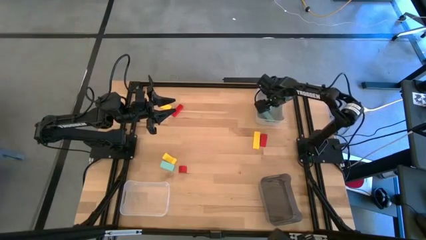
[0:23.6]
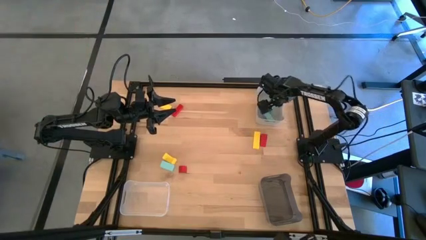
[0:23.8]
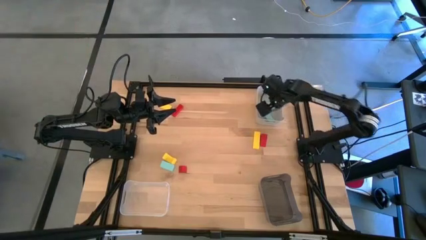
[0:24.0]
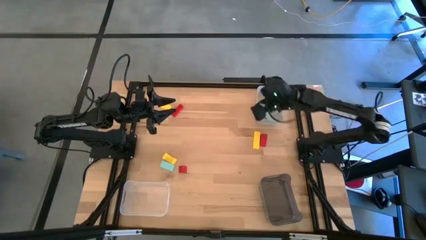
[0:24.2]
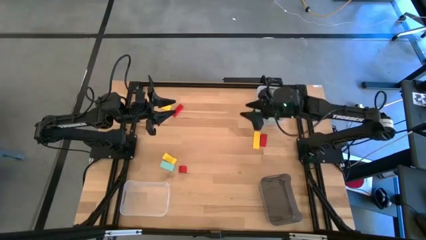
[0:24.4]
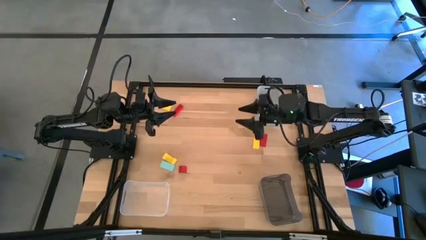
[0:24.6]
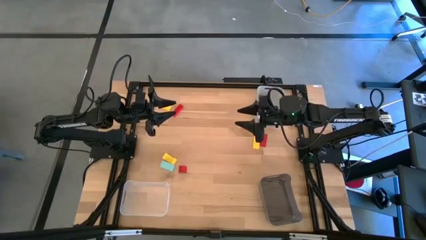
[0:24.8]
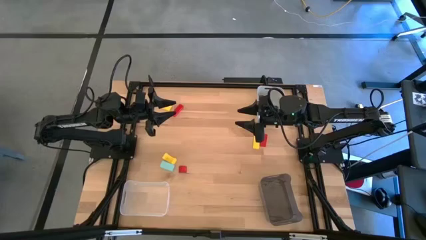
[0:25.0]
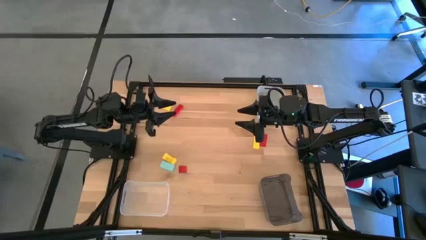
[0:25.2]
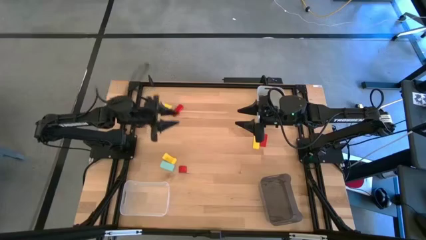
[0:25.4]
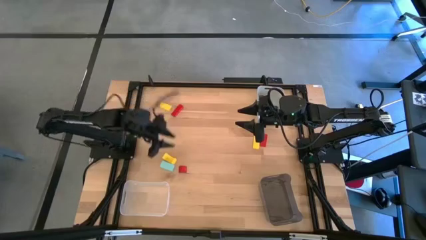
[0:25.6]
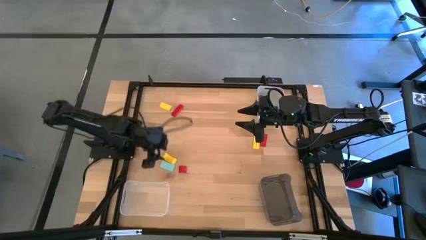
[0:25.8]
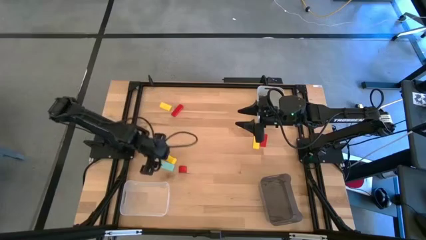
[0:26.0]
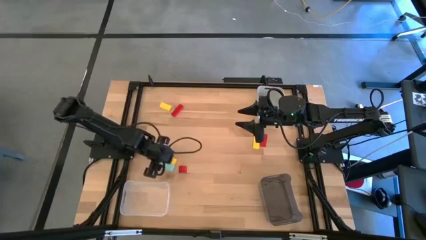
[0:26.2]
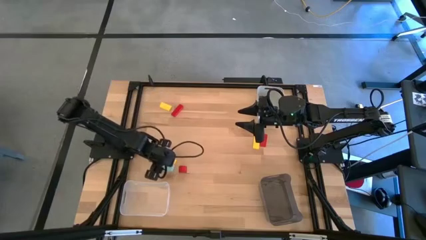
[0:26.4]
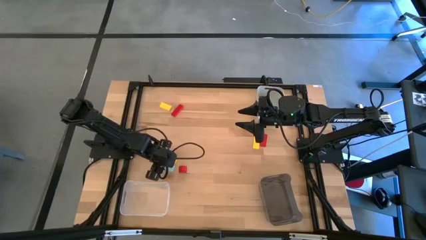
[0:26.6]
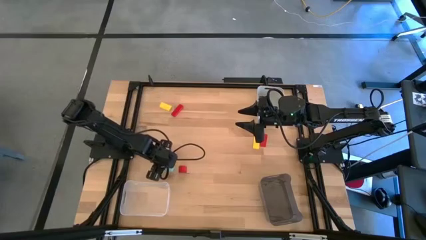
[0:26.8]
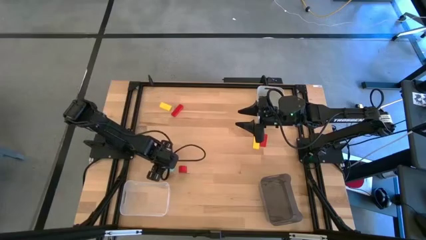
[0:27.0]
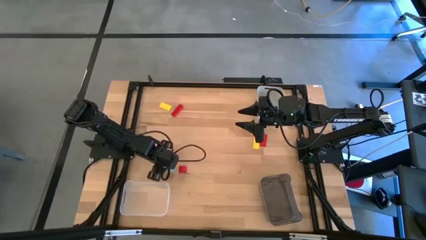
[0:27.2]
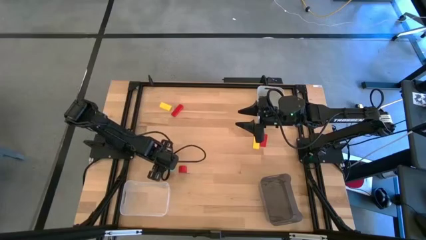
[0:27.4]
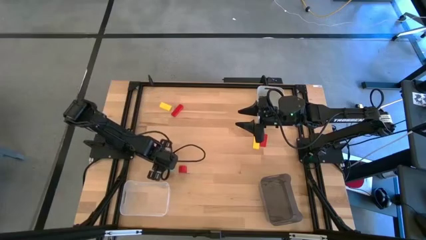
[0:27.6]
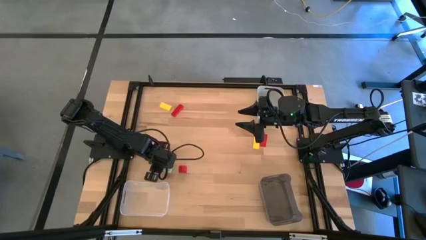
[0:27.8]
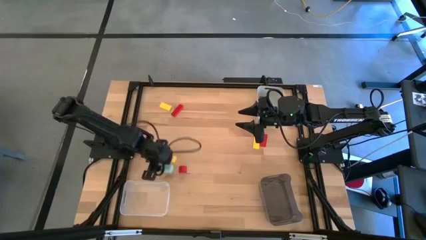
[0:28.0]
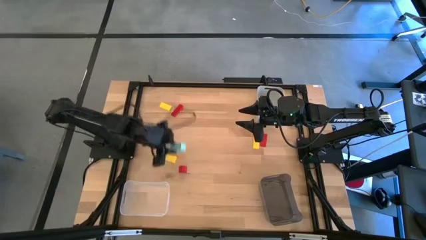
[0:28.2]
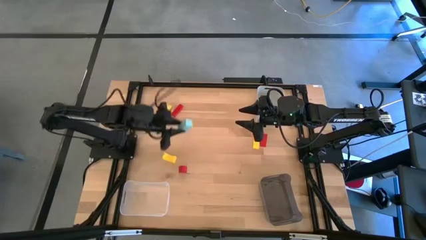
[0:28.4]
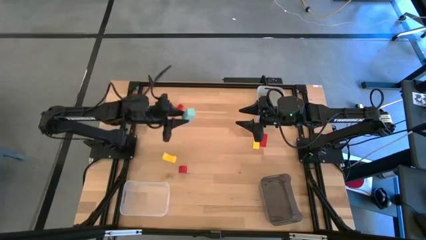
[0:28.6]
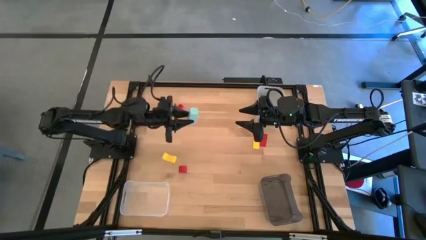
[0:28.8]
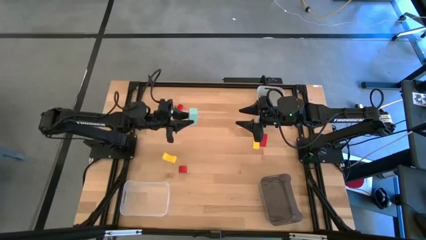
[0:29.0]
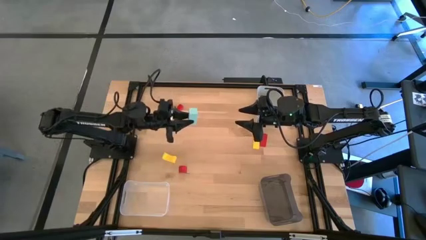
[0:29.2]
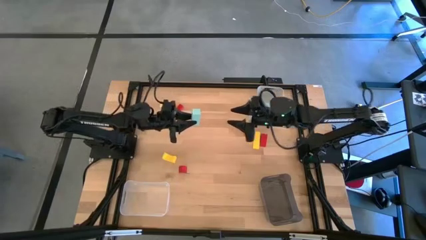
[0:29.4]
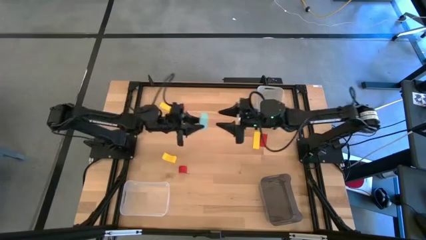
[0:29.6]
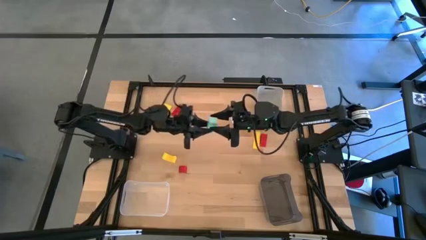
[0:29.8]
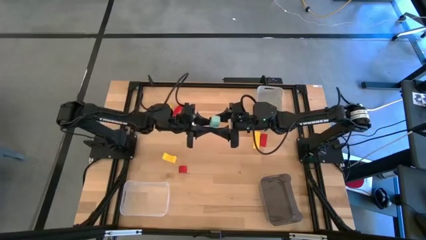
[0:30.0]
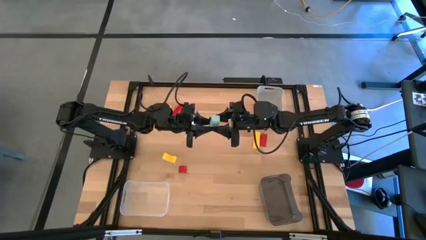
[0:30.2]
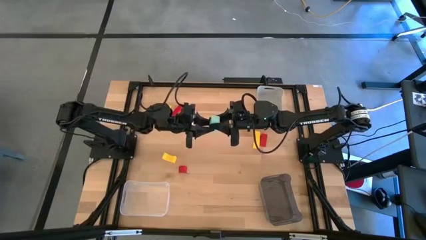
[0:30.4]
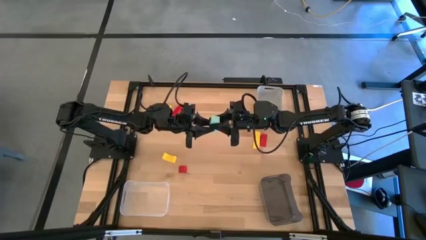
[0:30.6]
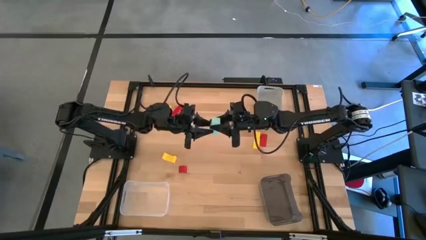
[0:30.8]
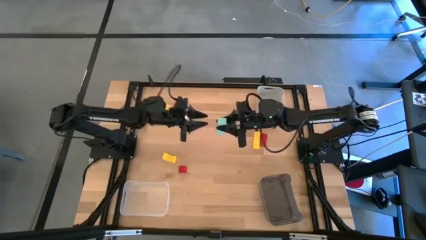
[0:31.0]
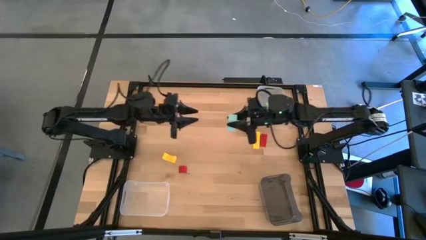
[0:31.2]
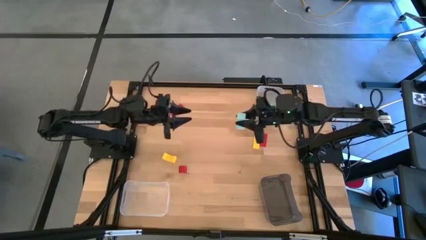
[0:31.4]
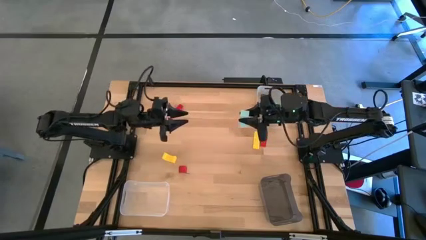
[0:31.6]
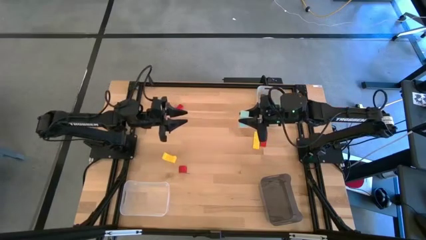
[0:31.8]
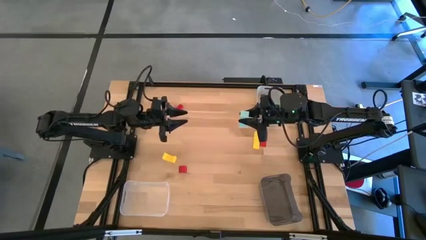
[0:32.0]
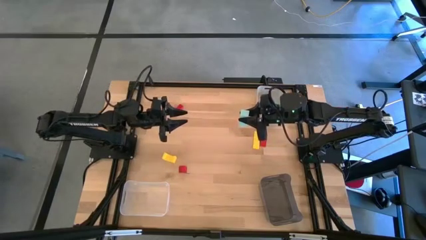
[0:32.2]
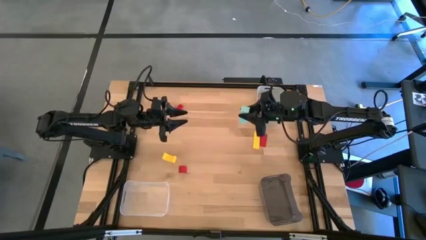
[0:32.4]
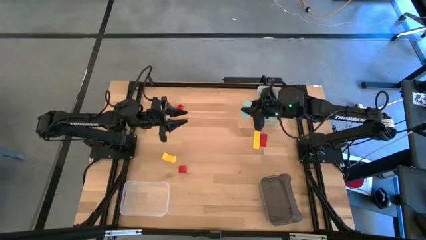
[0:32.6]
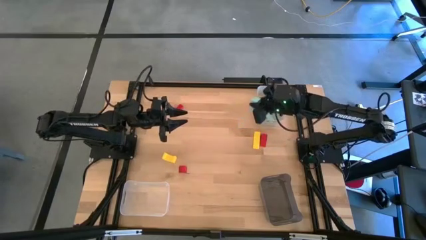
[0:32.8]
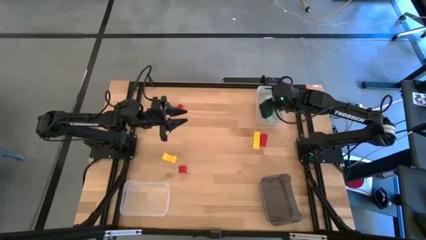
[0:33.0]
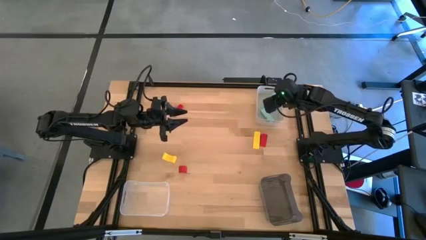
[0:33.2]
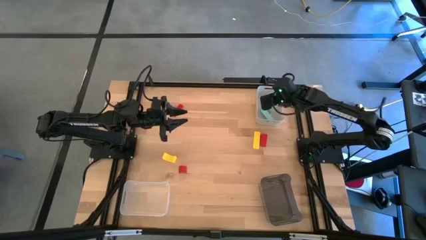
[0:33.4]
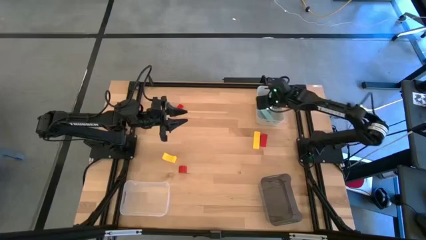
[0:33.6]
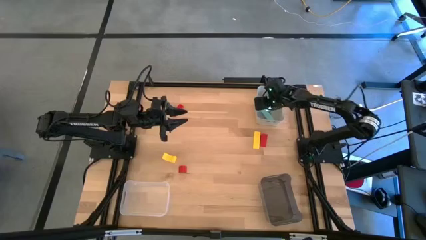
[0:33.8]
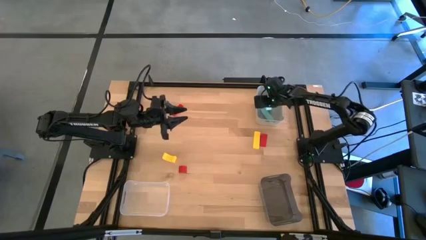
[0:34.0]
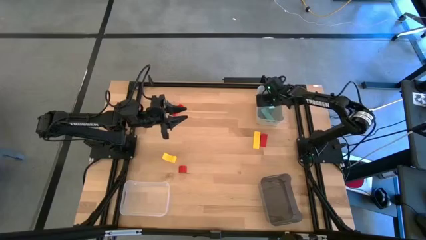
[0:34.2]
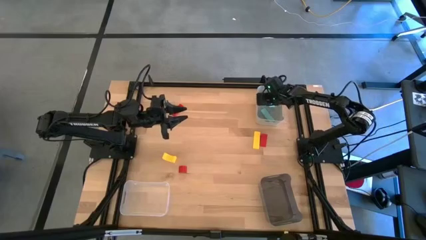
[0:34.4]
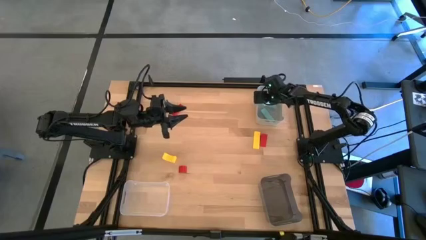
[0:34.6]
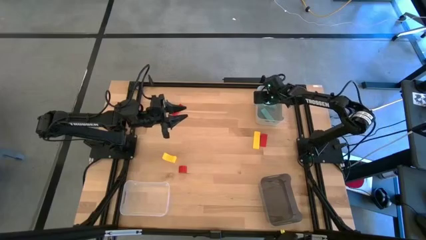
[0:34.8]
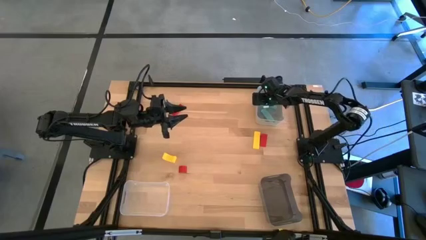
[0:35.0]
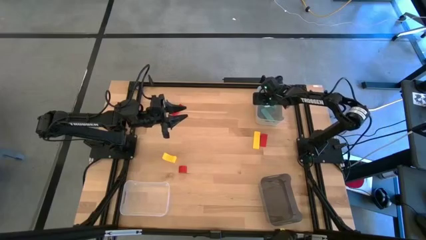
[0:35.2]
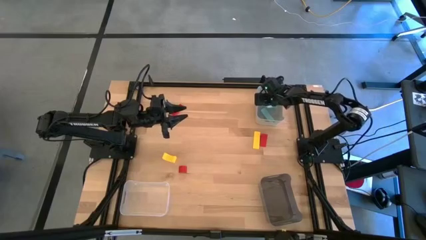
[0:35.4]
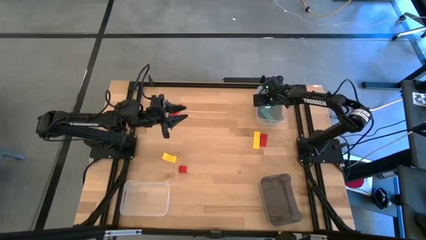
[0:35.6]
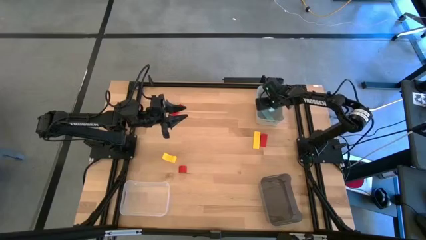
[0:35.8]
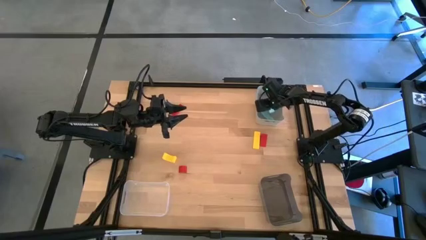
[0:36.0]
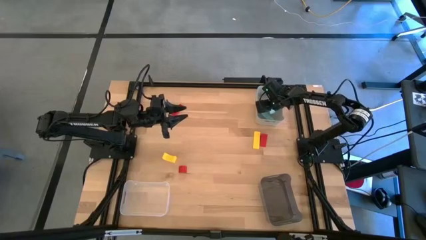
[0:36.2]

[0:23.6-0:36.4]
Task: Sort & place blocks by color
Put the blue block into the gray bin

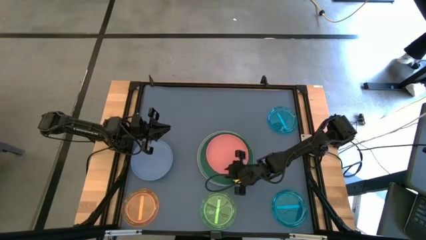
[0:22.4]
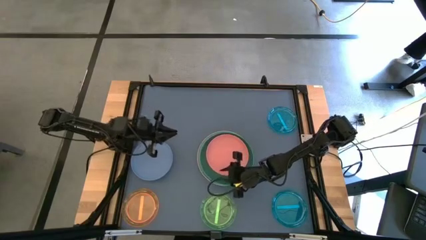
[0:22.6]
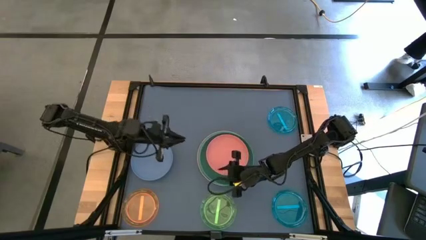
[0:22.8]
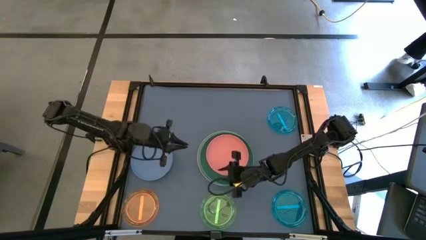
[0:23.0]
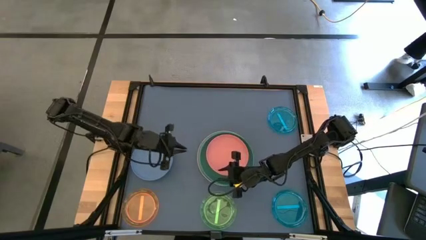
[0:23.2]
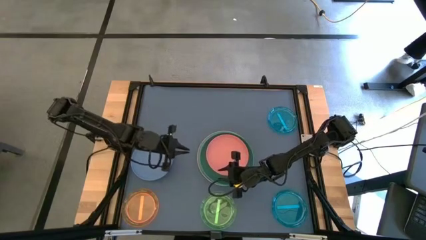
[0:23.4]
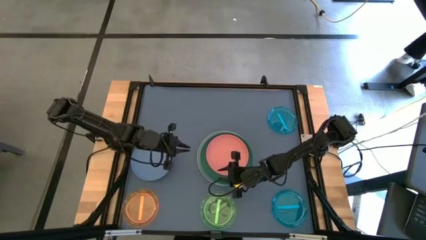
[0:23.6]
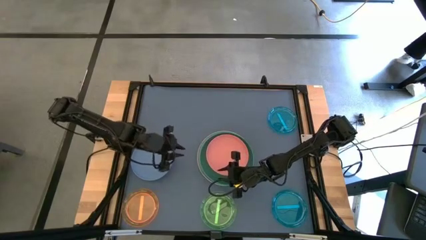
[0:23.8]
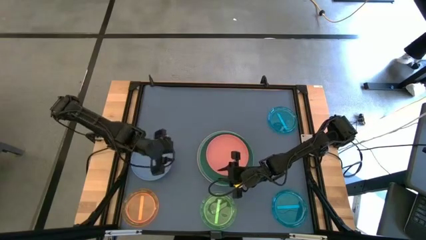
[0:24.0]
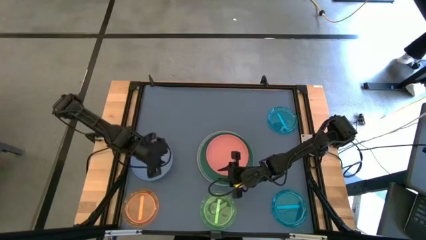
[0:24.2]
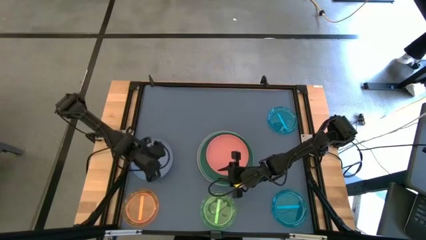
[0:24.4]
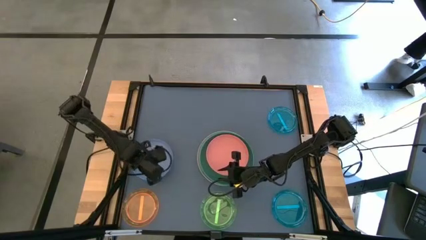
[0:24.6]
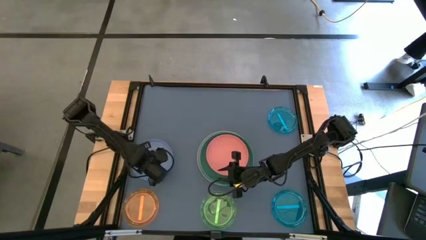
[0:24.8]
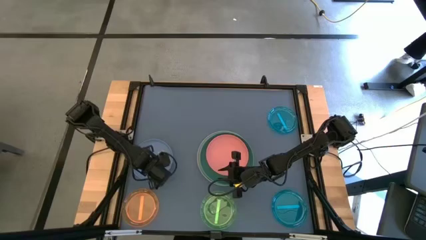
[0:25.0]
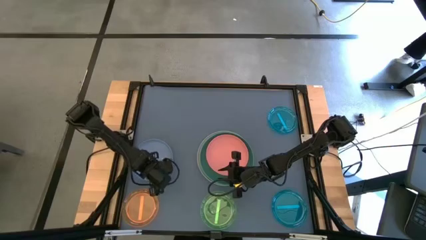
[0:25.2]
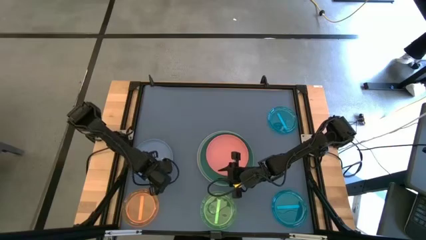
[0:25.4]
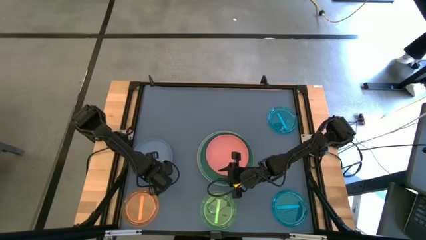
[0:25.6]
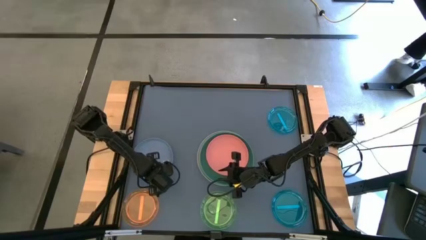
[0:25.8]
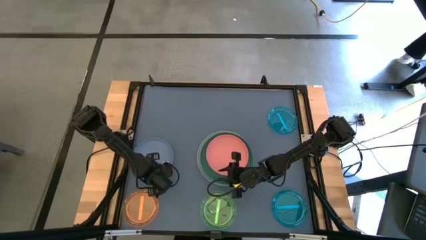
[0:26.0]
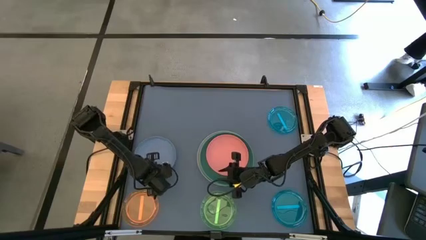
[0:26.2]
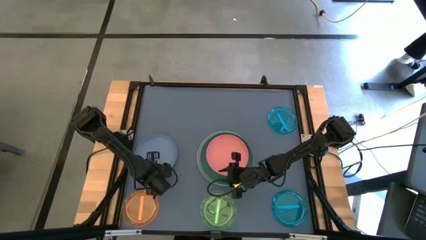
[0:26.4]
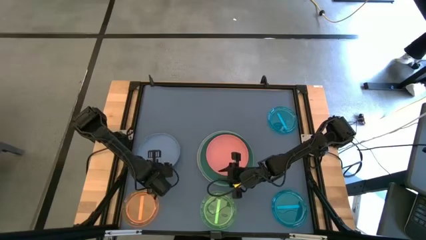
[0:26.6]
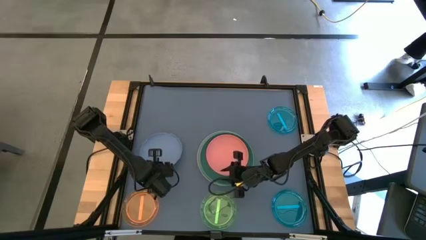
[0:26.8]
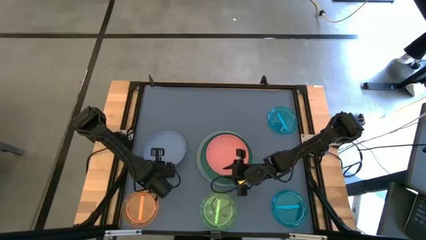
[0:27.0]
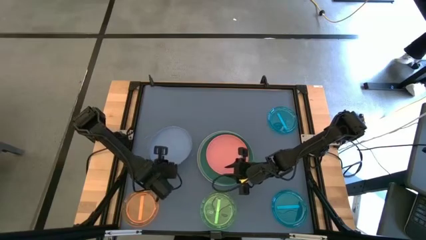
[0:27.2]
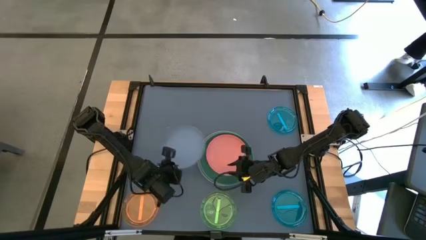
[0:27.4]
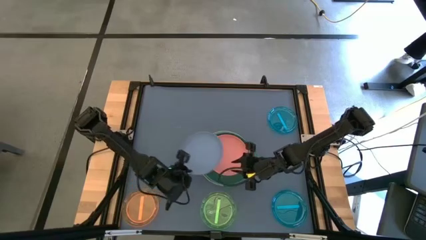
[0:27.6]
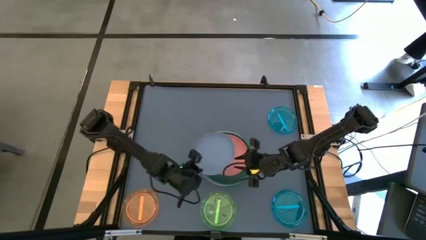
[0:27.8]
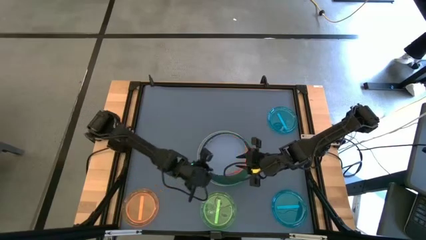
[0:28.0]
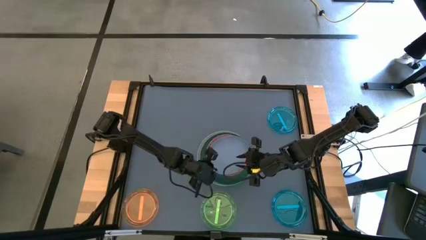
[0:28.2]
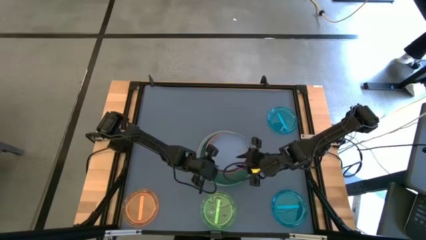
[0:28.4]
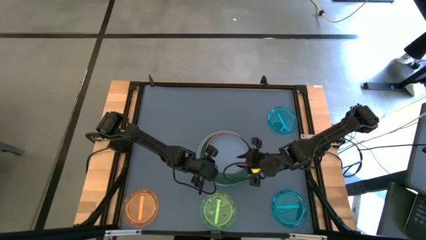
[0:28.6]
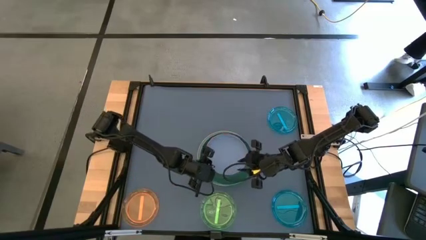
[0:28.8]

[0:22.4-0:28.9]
Task: Stack plastic plates
Stack the blue plate on top of the pink plate
